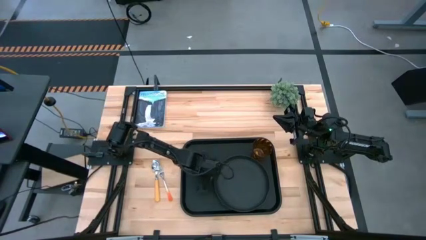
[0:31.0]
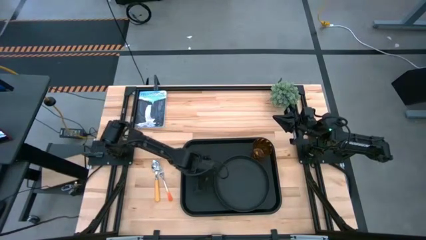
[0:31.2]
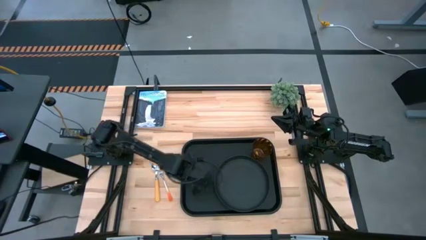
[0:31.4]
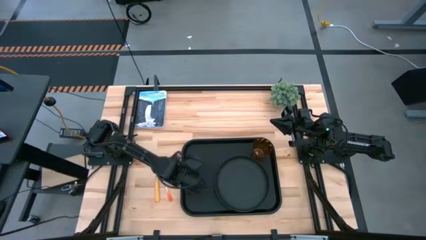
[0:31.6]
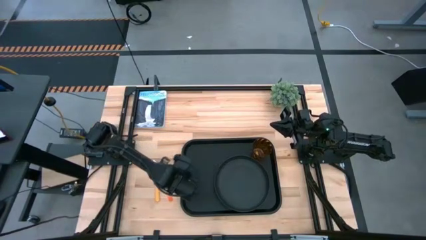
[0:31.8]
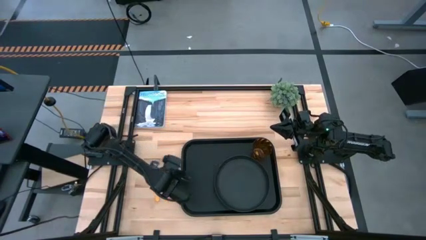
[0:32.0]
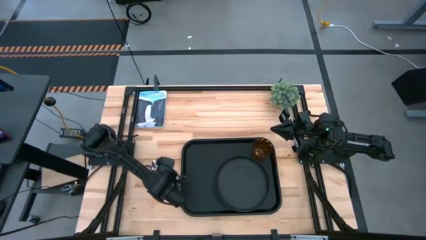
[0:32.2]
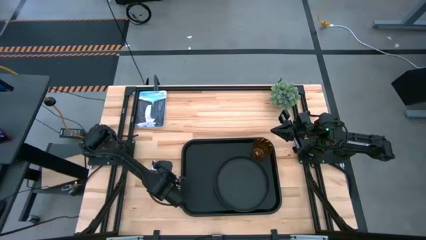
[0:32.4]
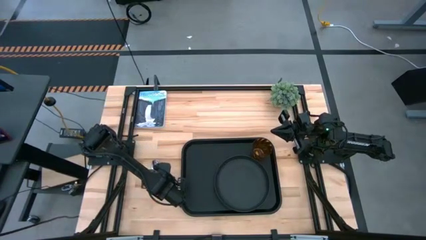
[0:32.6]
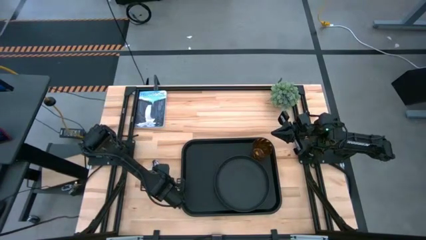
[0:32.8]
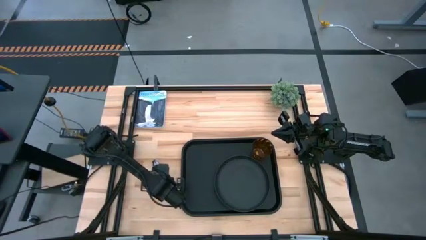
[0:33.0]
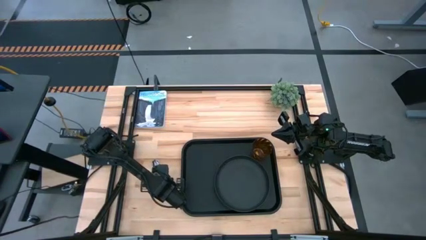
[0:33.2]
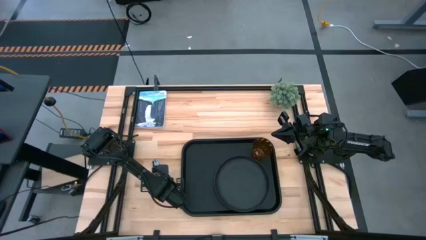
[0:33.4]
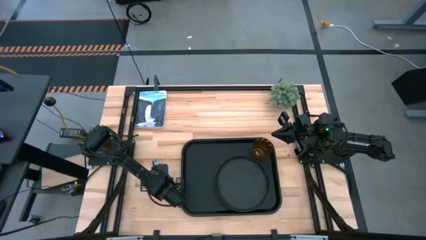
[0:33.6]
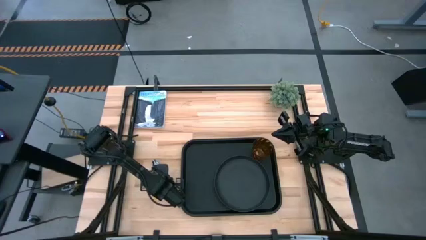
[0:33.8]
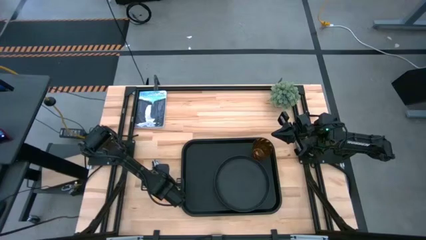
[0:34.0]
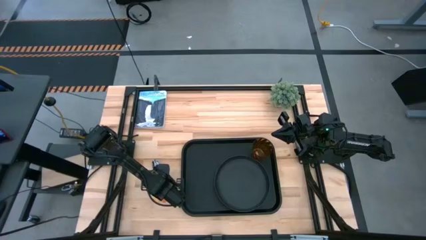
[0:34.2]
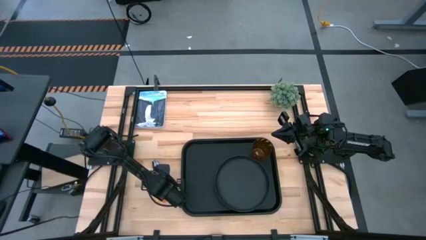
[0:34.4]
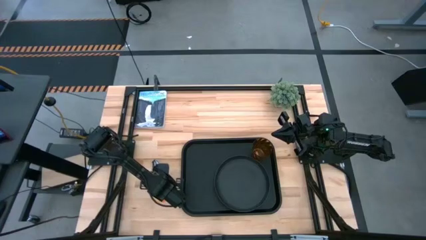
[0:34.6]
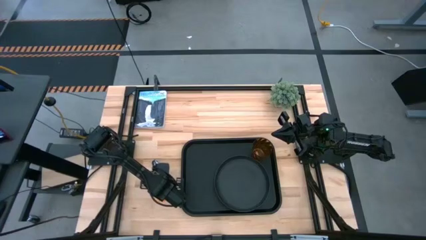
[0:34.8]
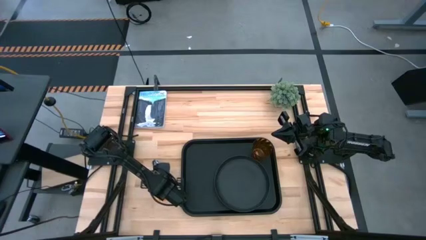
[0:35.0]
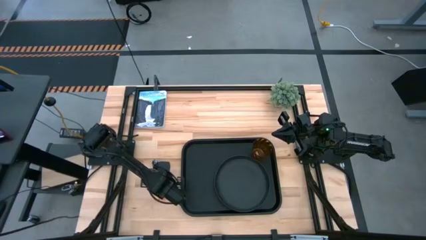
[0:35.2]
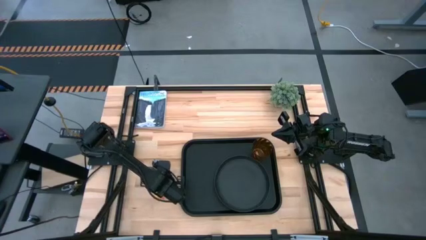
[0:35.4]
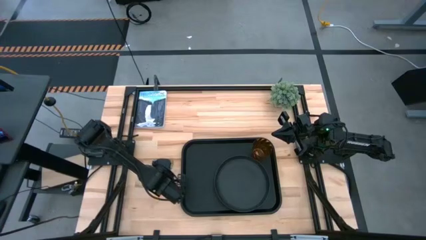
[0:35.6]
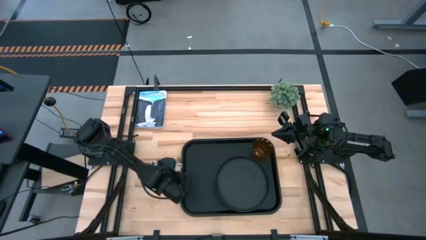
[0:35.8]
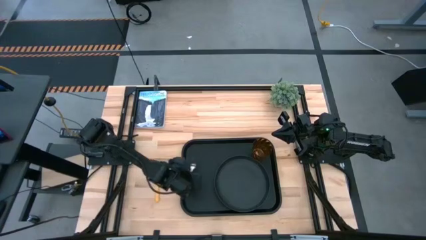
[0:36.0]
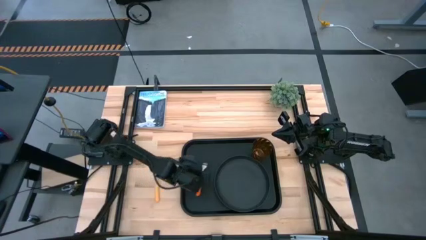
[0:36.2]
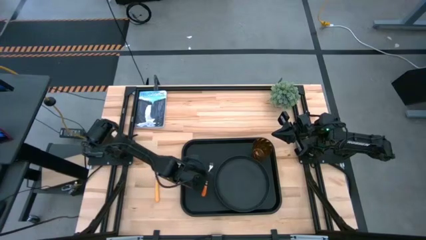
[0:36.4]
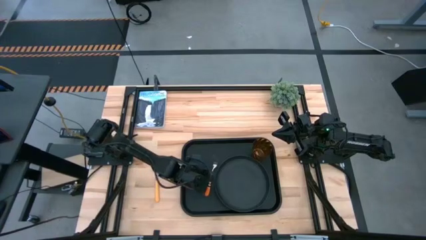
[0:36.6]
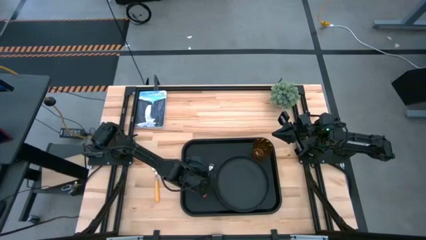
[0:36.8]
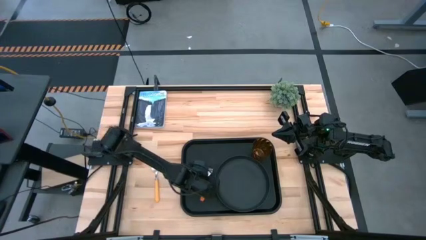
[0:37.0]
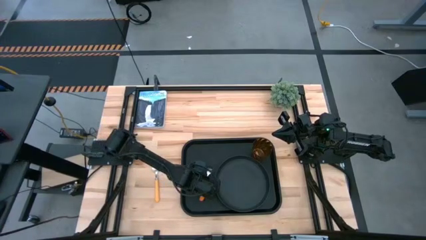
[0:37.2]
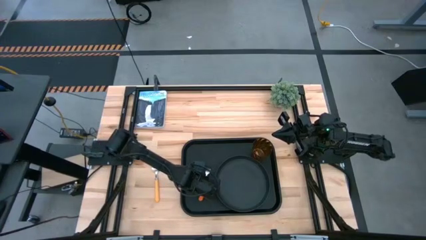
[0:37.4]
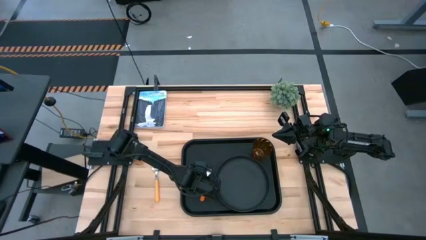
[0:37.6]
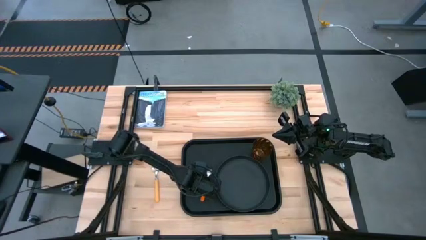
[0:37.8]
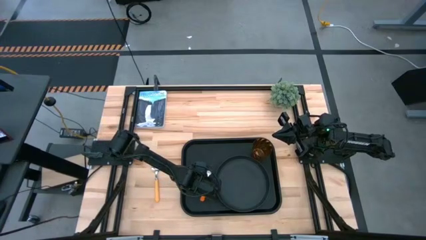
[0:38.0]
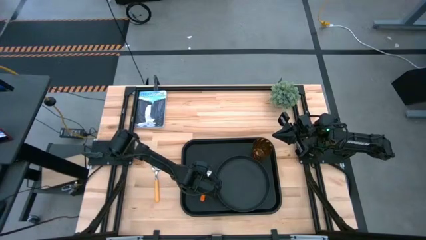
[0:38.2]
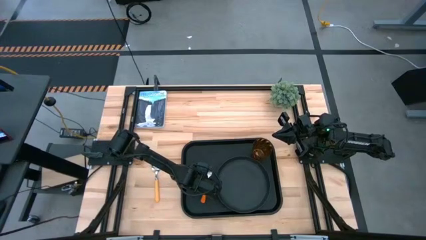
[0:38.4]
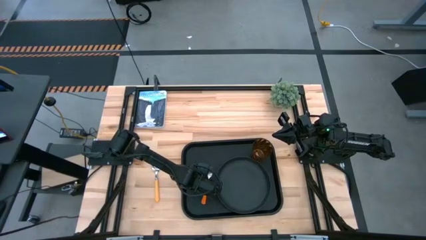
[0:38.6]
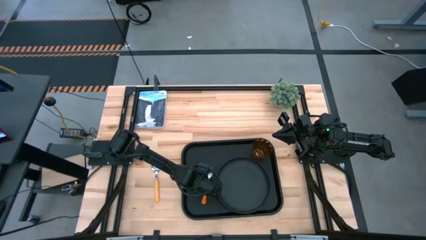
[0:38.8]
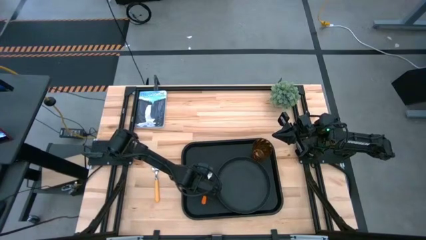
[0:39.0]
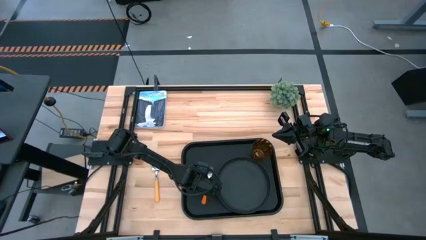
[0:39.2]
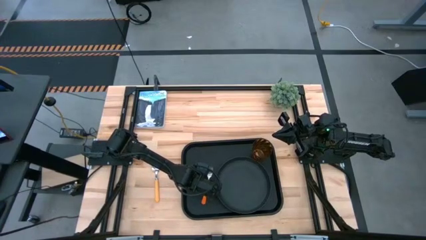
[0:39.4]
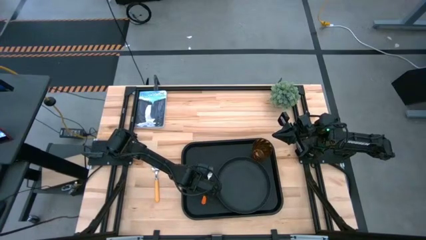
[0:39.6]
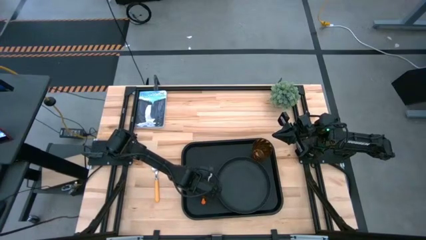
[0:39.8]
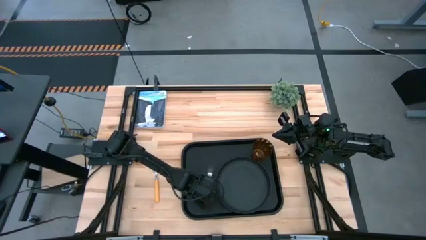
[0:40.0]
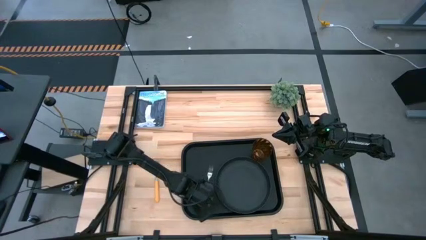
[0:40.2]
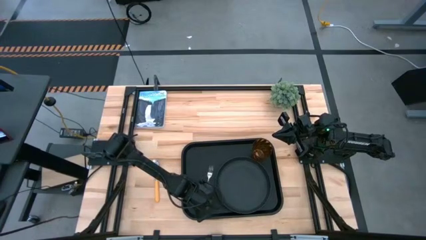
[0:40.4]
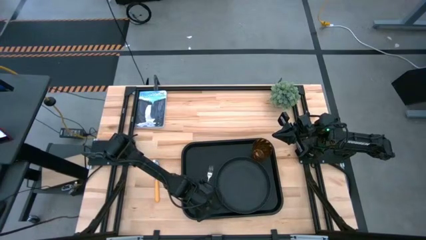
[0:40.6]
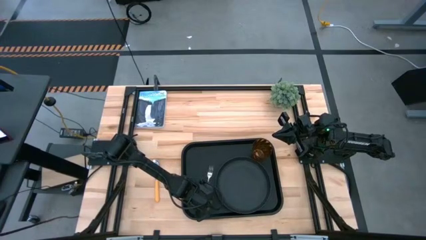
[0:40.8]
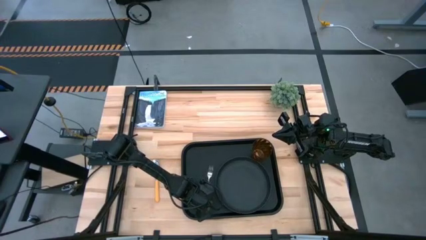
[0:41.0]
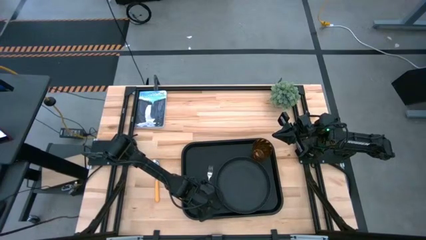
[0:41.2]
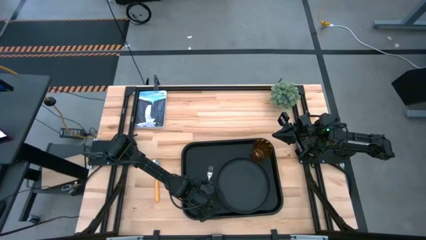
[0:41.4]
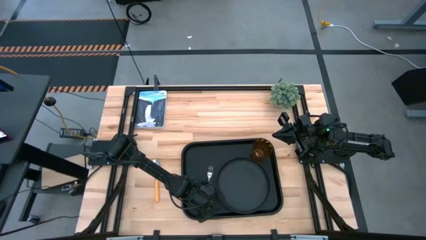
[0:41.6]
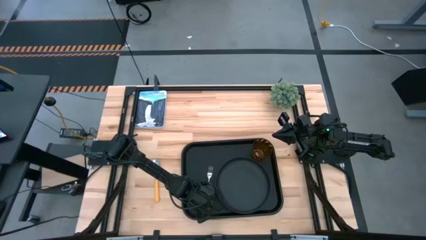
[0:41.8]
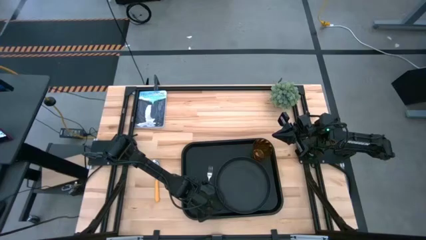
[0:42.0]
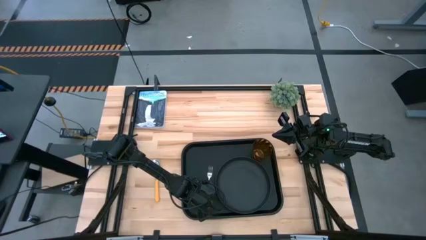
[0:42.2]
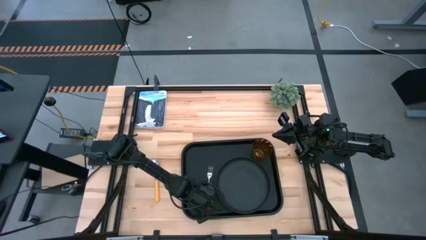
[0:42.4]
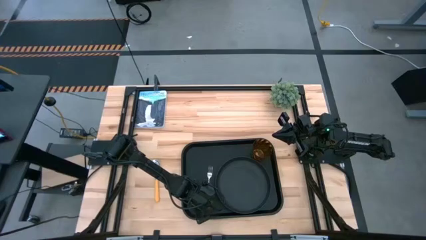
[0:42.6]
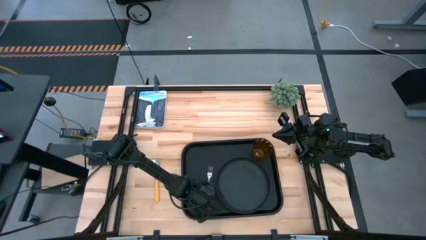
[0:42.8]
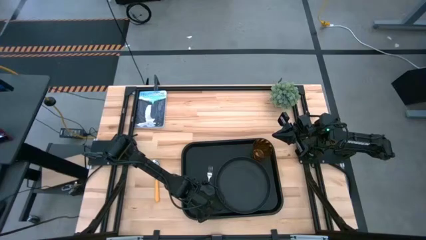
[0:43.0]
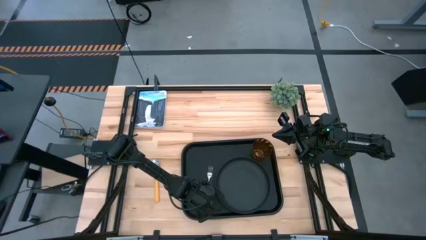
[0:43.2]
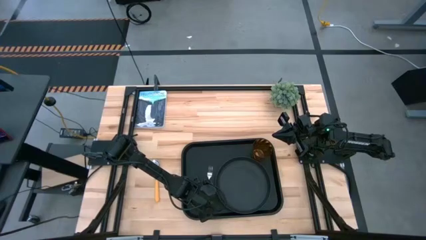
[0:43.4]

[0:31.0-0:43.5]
Task: Pick and place plate/cup/fork/spoon on tray
Put the fork on the serving tray

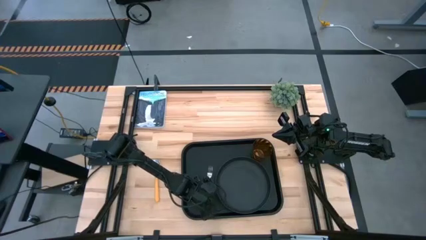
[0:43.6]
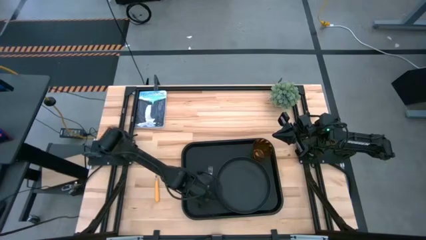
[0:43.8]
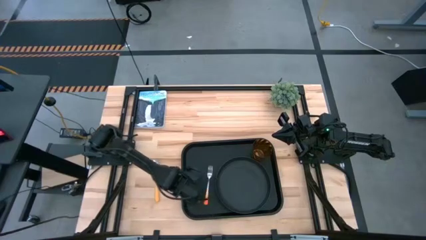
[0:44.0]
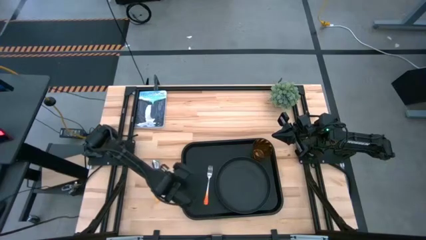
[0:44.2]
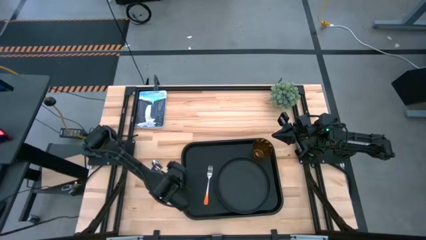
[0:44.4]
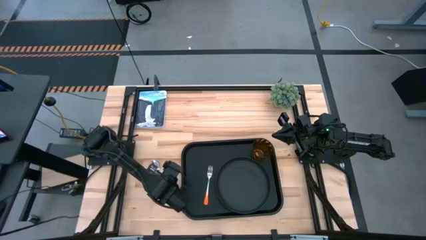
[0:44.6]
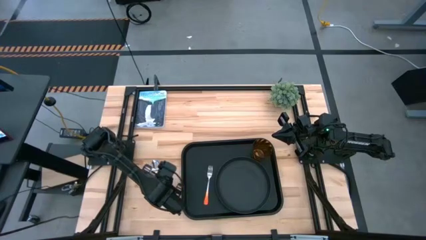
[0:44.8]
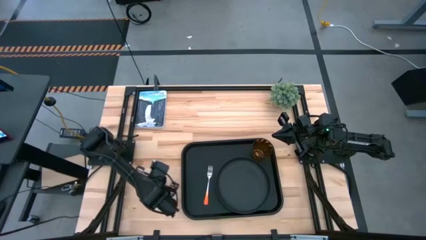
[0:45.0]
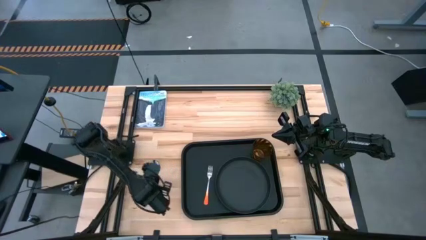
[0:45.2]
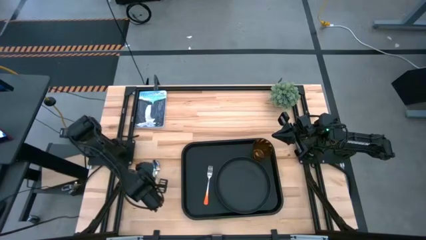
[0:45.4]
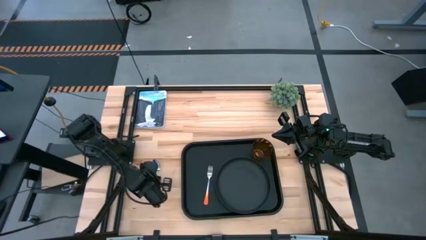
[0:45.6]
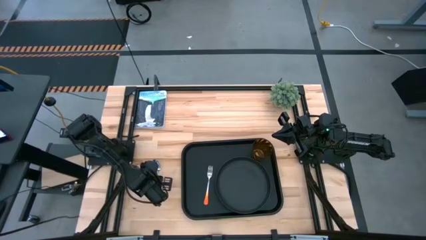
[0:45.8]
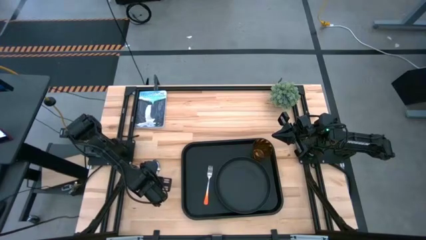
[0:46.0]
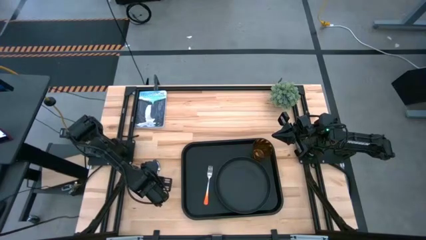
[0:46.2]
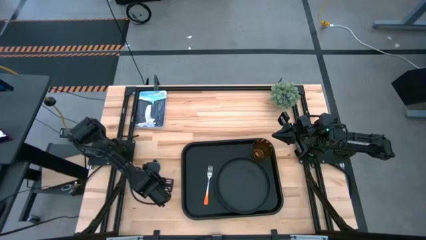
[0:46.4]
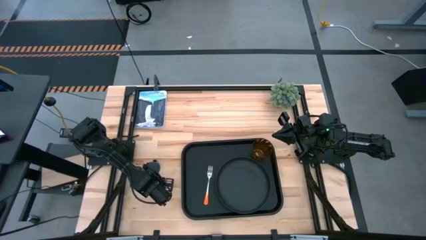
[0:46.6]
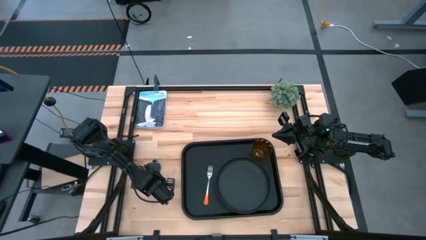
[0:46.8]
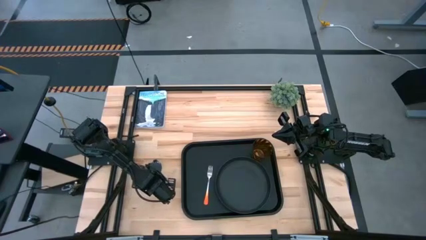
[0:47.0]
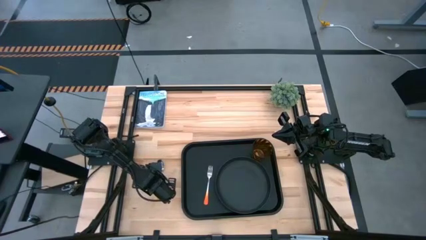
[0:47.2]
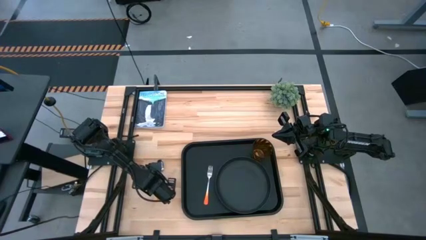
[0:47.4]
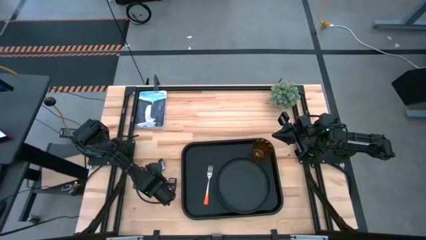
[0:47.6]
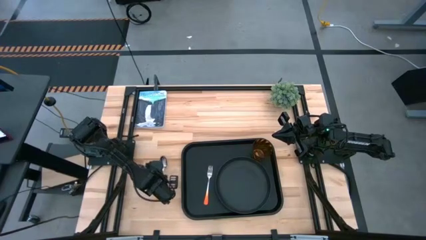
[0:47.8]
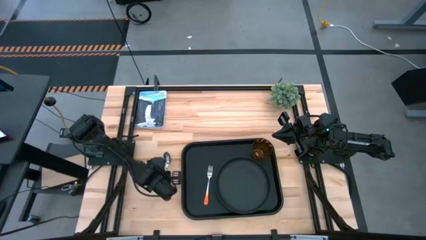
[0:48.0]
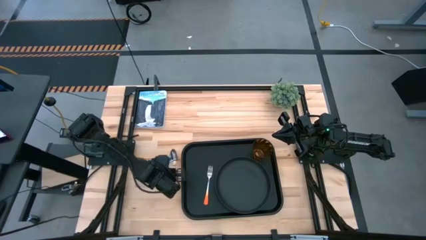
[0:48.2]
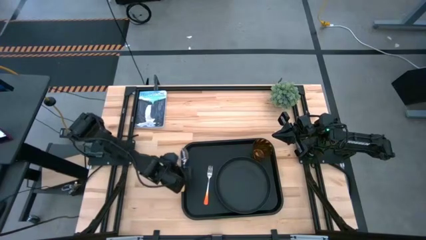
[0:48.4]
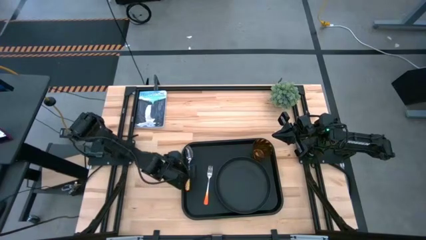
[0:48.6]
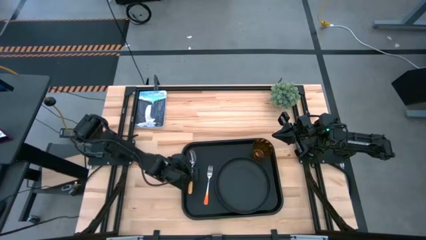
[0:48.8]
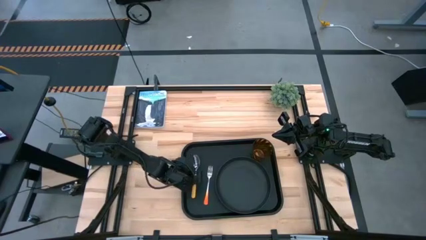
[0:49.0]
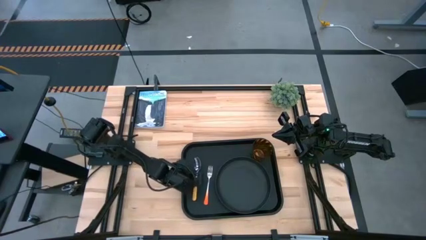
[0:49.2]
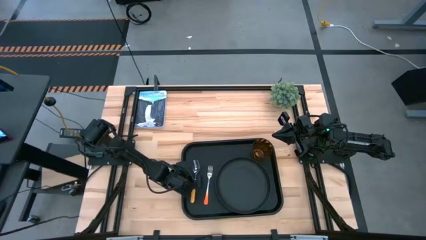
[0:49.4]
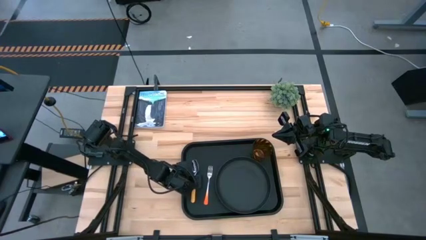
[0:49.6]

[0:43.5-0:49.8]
Put the spoon on the serving tray
